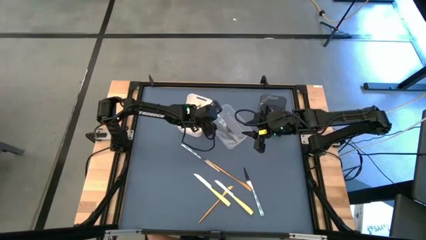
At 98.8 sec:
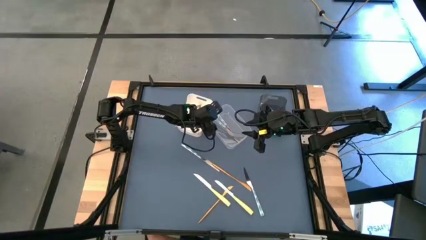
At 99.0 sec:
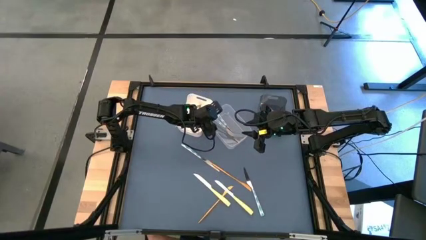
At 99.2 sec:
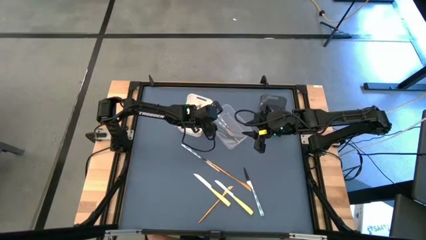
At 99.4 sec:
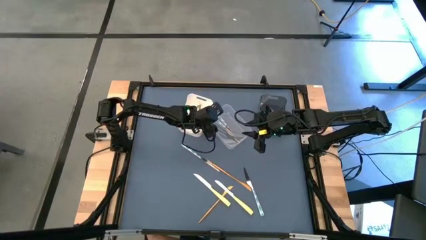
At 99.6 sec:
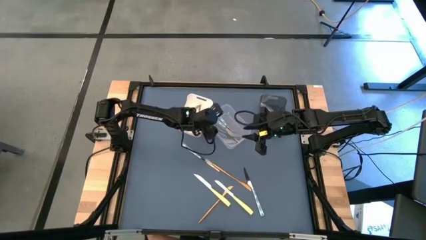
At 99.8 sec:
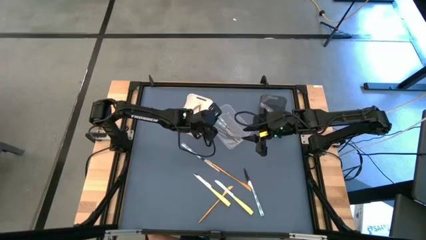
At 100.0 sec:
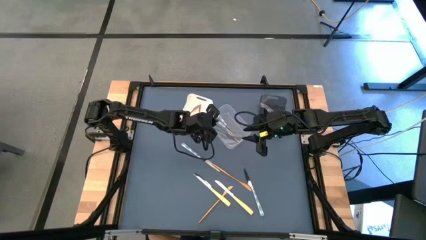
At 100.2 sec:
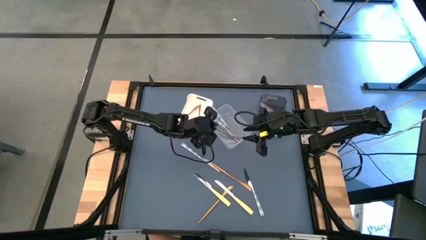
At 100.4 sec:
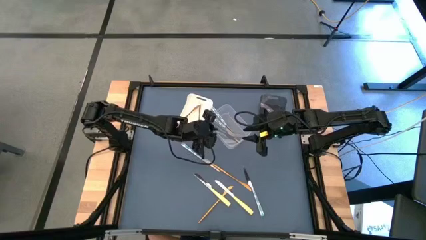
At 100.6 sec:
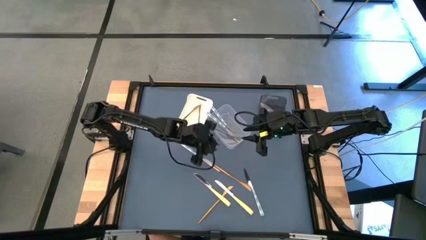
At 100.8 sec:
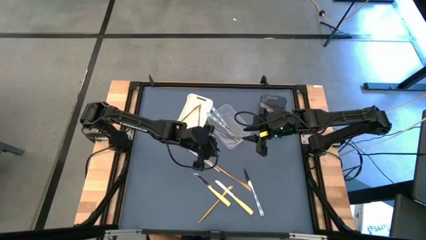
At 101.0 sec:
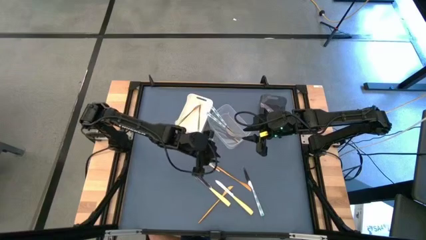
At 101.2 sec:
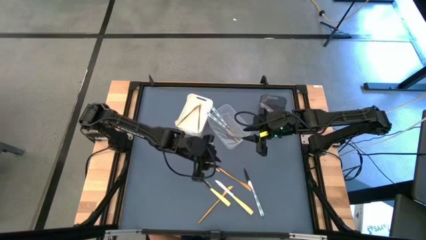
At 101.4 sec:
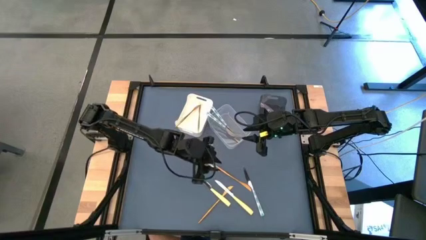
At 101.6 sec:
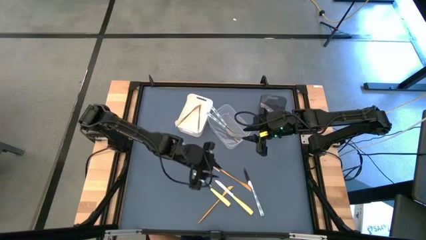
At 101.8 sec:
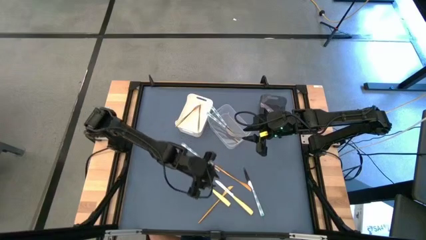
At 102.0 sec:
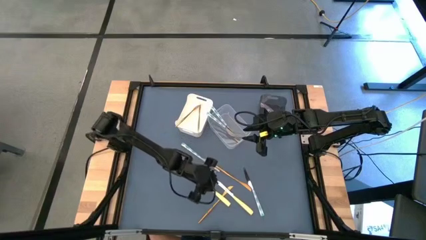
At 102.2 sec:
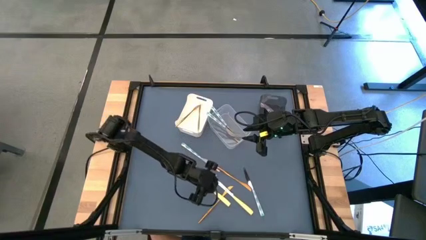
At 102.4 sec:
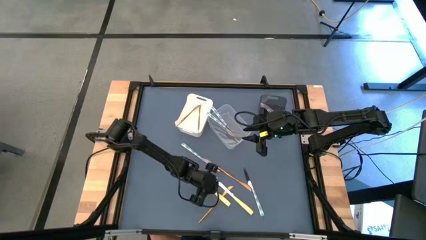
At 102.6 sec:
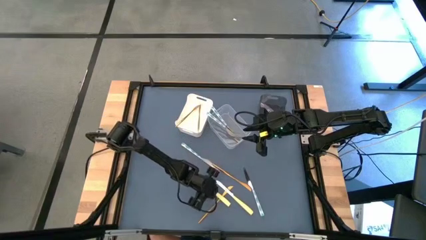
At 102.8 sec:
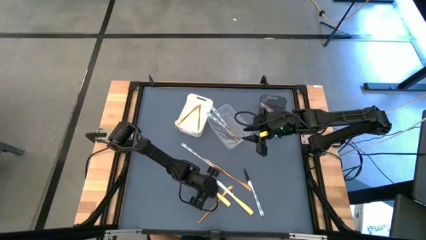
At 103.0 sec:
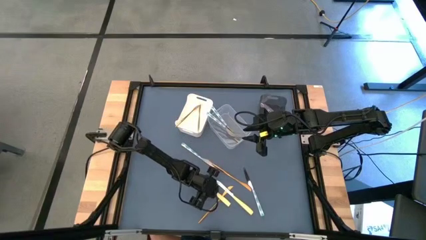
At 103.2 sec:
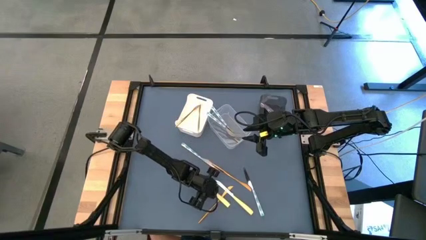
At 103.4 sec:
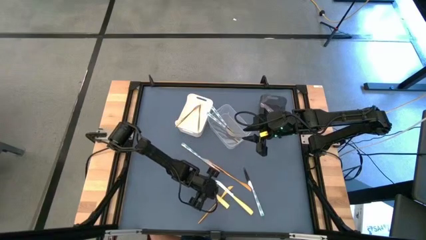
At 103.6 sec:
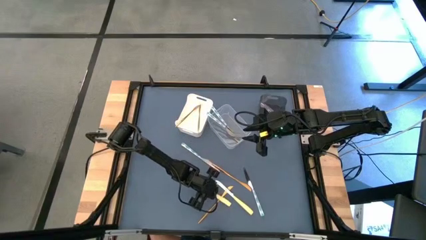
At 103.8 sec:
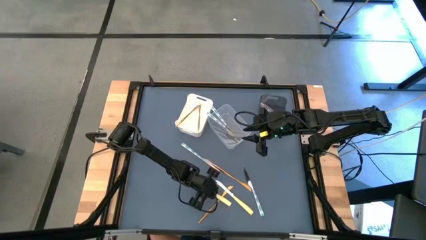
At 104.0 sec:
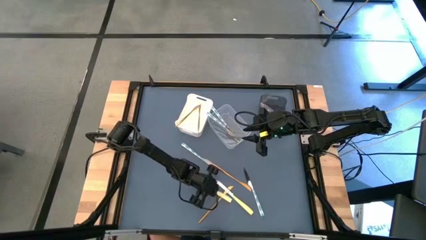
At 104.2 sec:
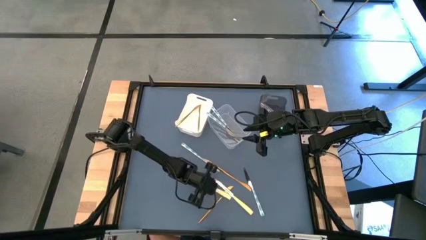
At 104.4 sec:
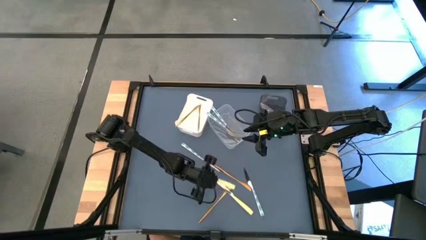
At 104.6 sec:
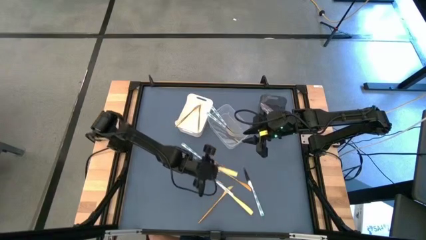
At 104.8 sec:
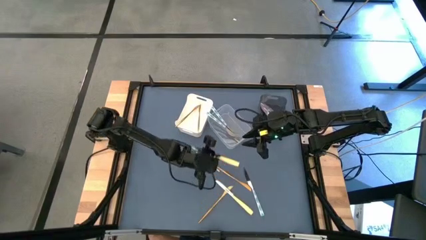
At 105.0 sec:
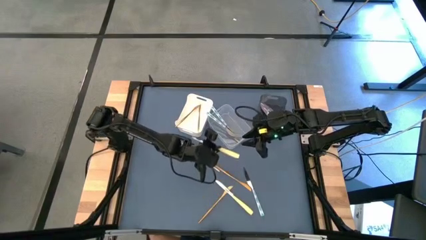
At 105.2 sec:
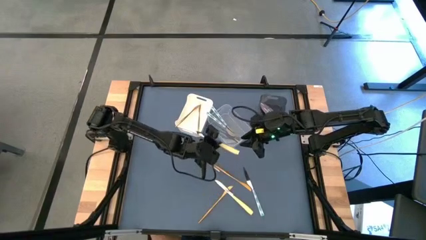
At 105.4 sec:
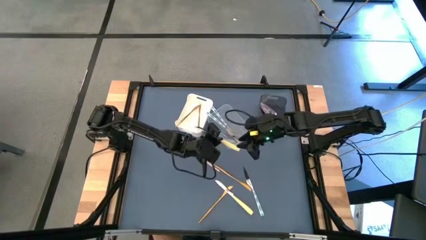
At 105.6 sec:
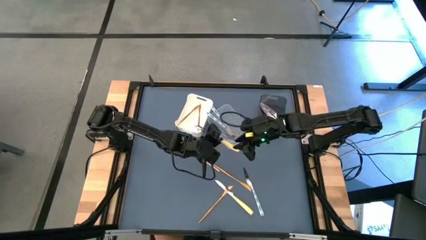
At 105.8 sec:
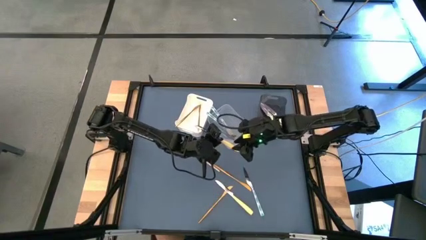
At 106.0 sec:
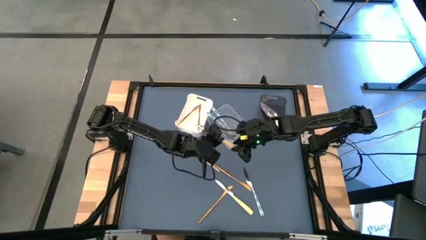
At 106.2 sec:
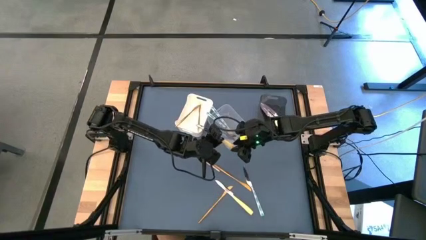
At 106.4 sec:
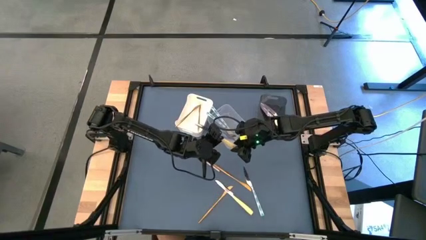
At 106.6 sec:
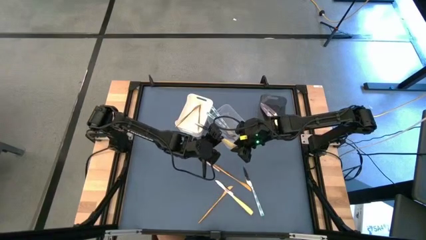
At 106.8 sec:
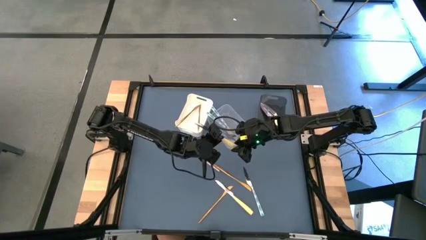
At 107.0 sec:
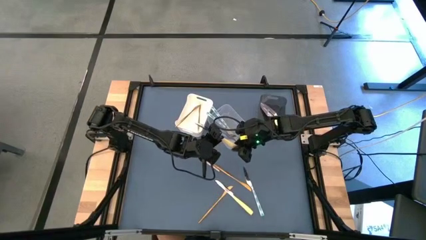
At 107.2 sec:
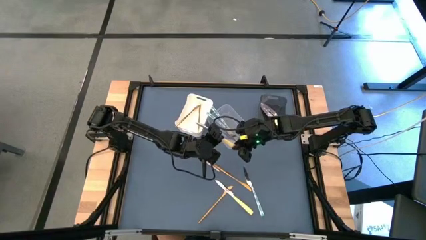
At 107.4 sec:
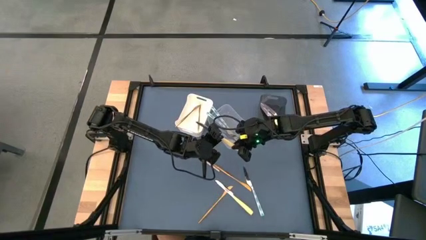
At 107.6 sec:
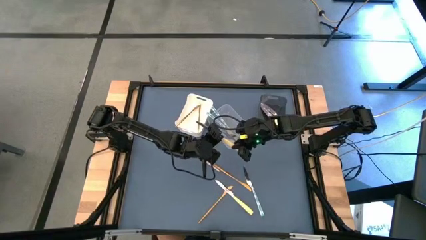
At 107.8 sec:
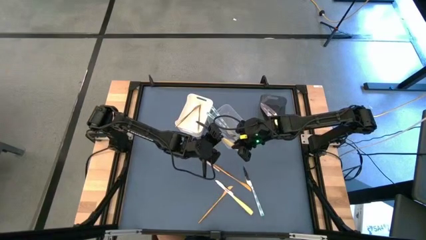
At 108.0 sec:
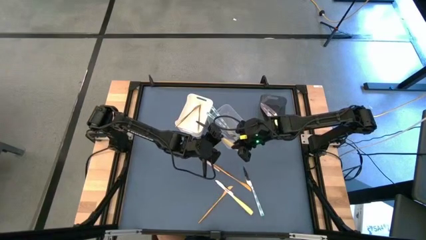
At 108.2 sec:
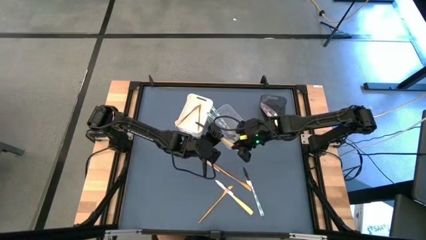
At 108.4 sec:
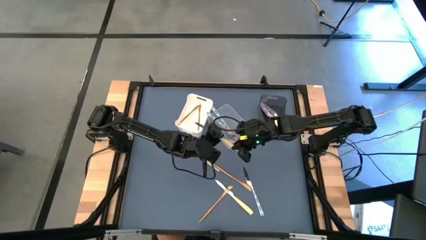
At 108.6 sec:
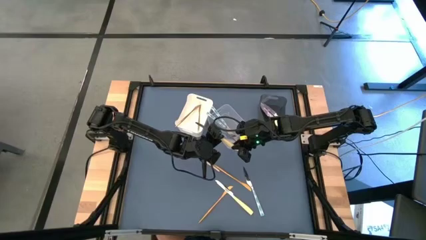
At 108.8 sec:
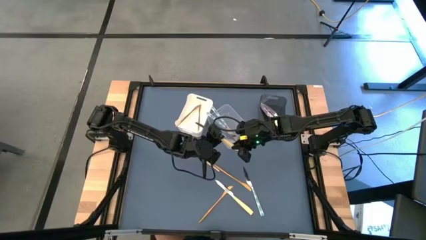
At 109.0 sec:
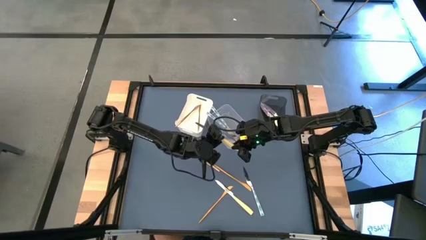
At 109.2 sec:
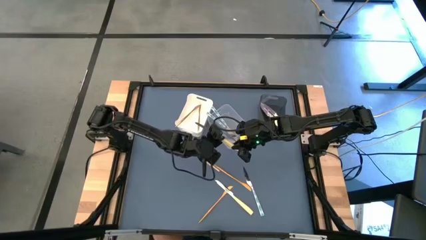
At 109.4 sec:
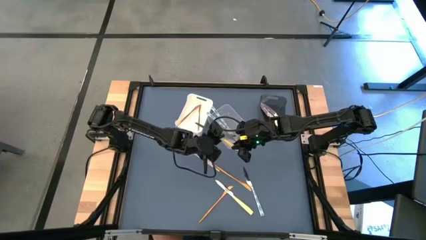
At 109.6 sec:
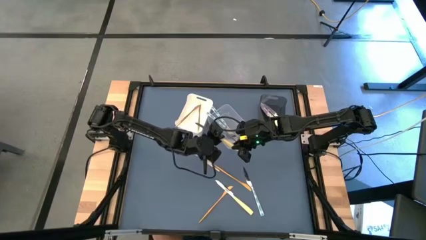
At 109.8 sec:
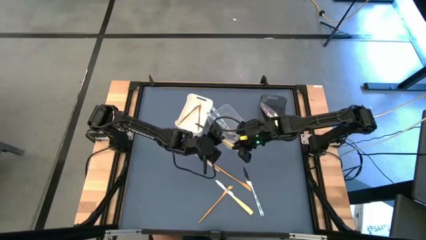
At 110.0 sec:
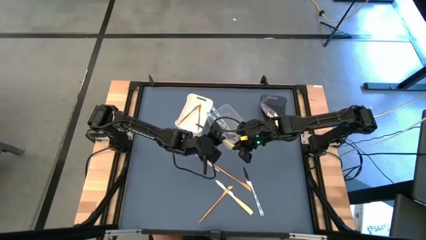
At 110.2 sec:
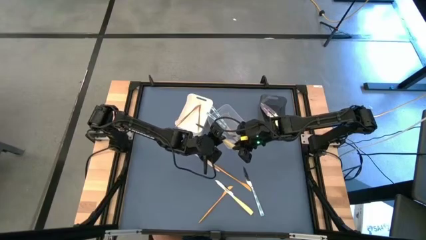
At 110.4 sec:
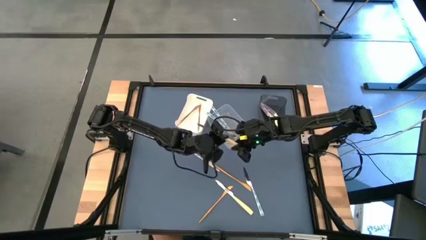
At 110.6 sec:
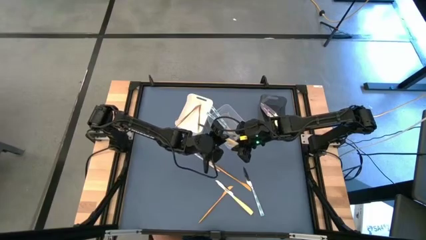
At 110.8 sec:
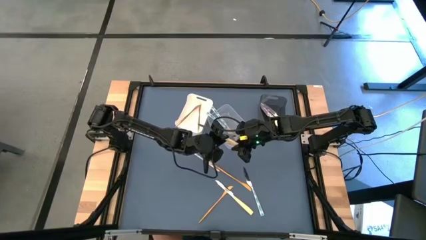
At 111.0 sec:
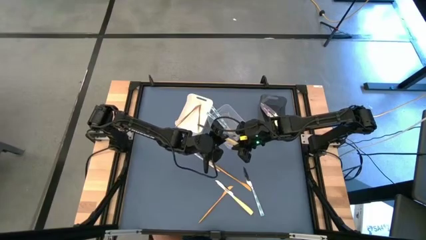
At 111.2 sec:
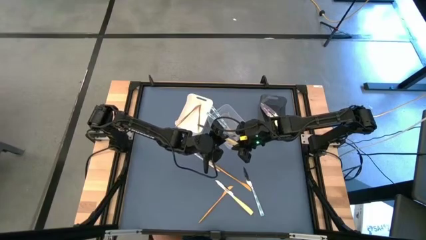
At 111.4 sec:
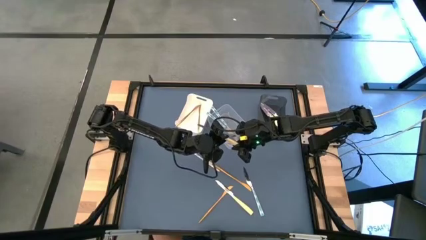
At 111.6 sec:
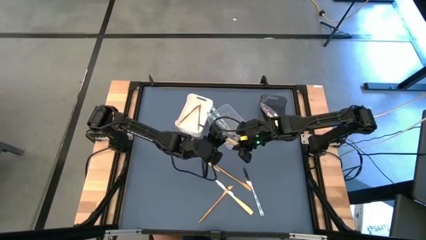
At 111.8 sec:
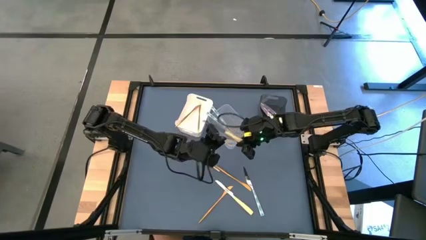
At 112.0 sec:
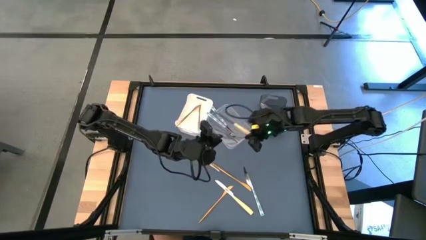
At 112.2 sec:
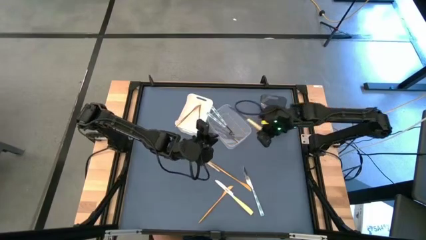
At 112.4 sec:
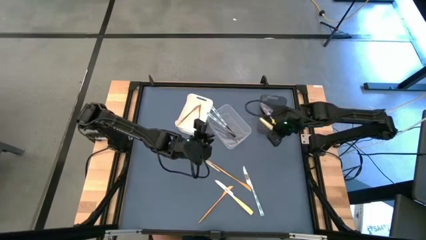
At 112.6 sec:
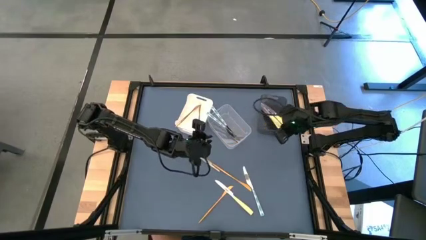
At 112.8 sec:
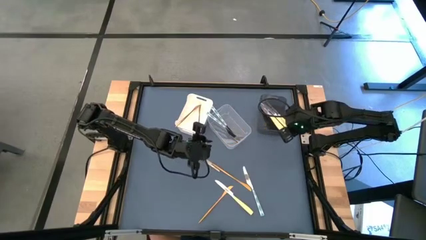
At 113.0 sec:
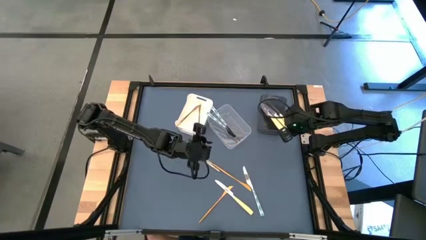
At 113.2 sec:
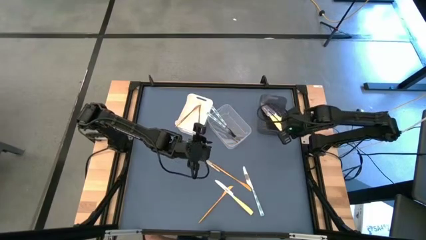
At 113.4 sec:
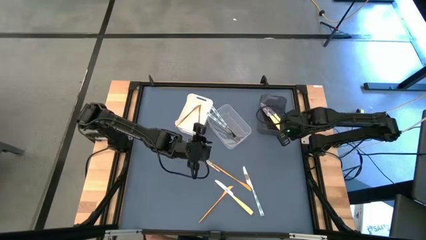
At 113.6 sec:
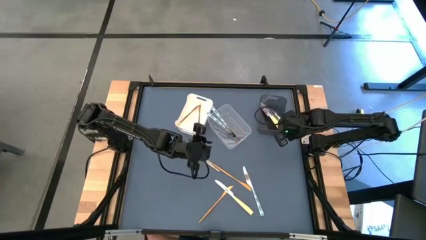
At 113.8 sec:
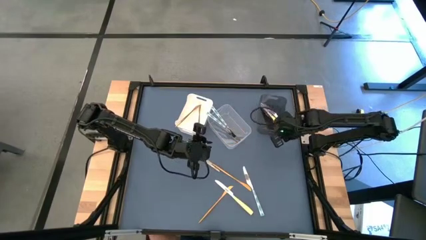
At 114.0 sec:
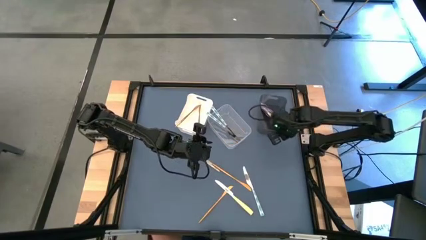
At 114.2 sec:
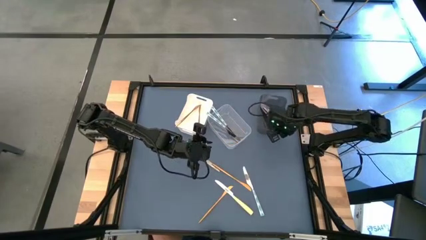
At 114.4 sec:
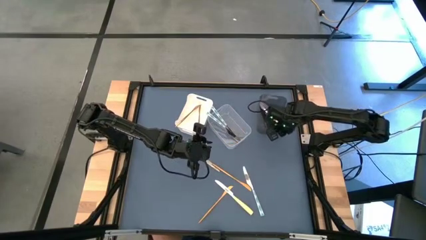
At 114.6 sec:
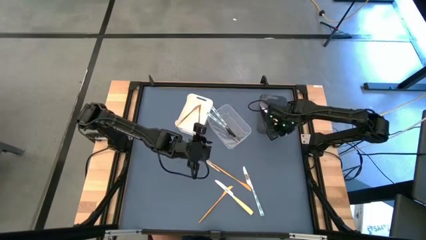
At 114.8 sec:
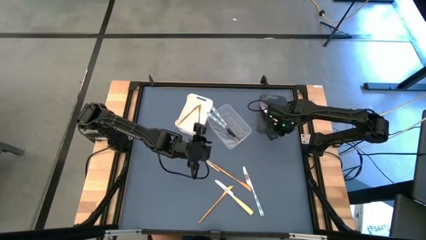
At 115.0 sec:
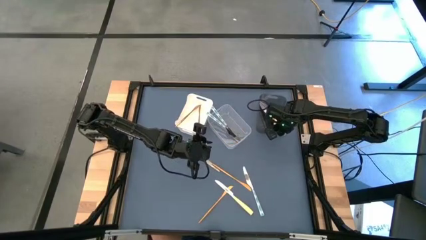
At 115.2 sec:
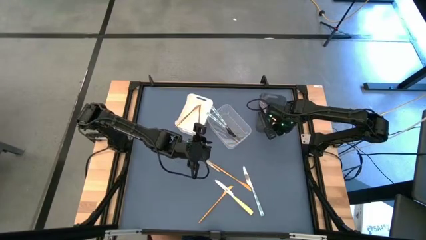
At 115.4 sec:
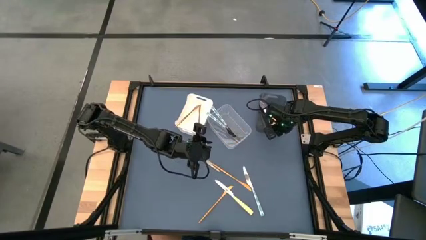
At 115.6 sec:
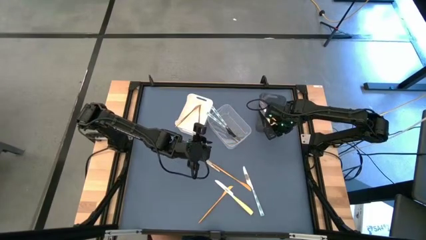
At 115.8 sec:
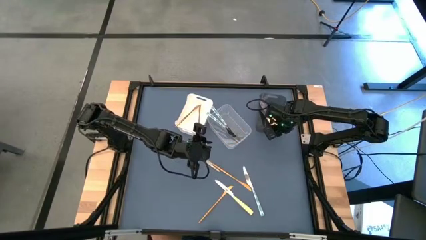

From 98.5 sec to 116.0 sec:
Task: Sort silverware by color (type)
Put the yellow knife into the black bin
